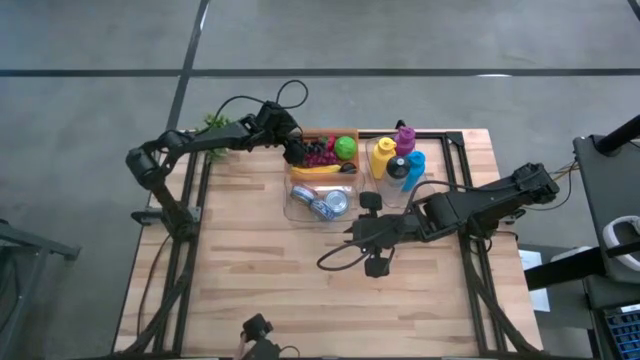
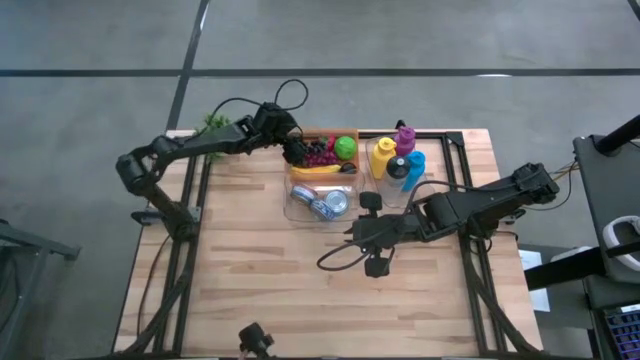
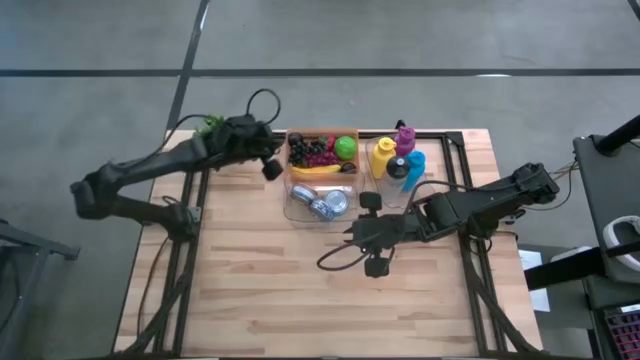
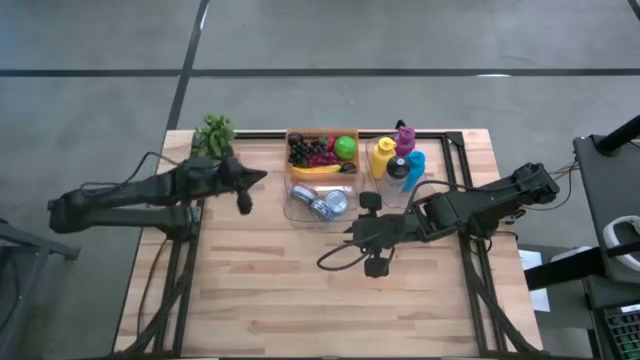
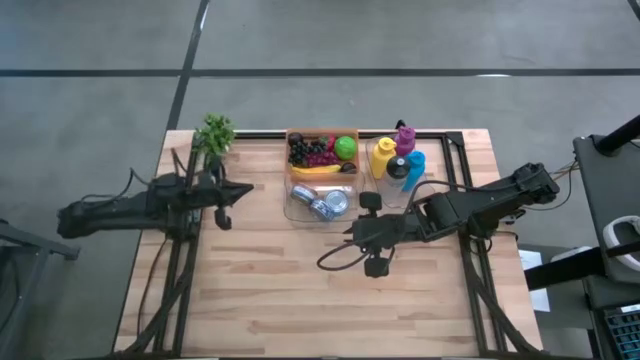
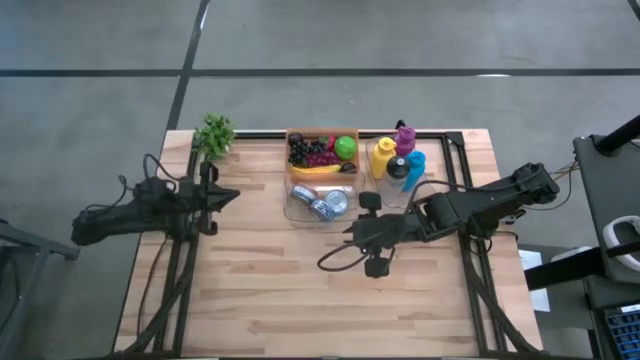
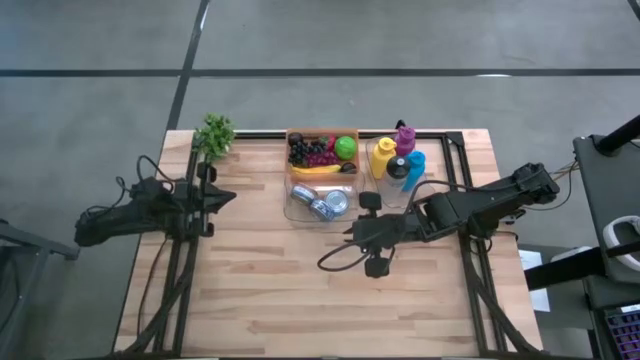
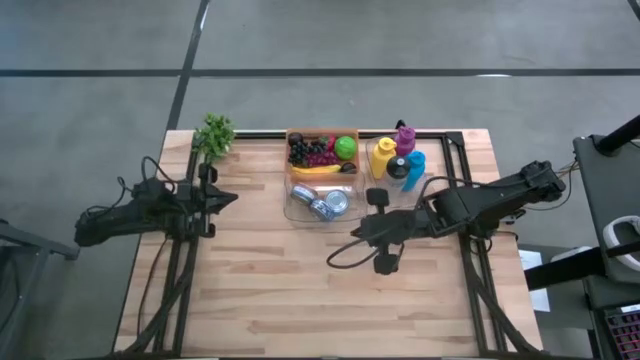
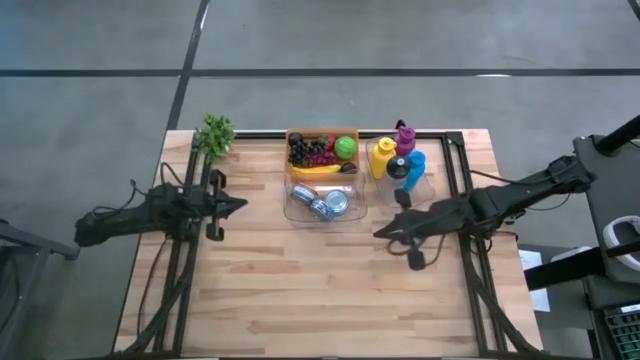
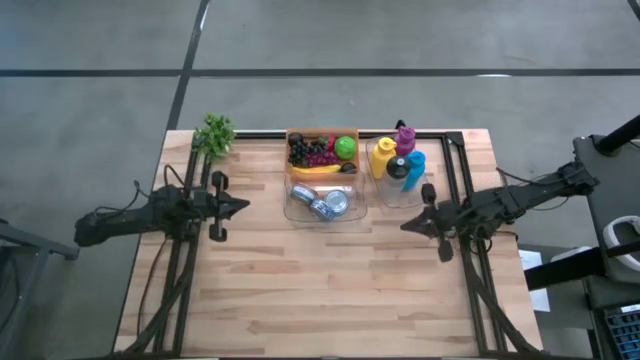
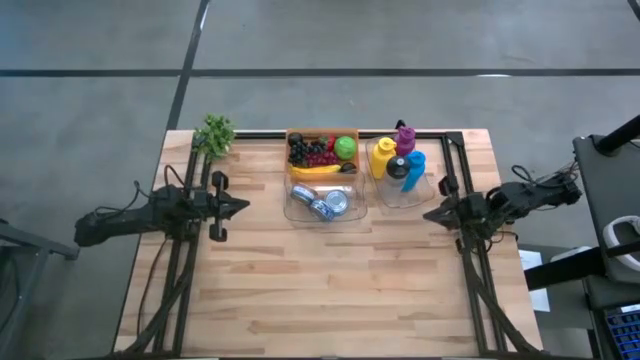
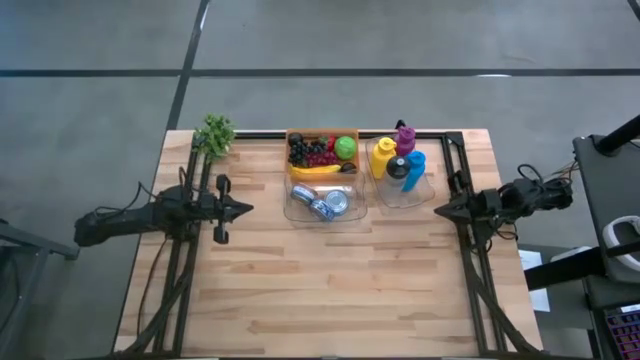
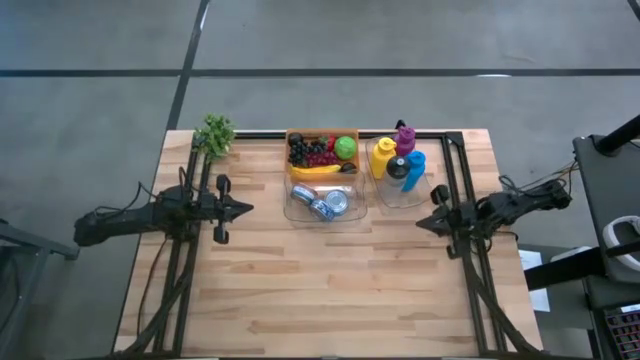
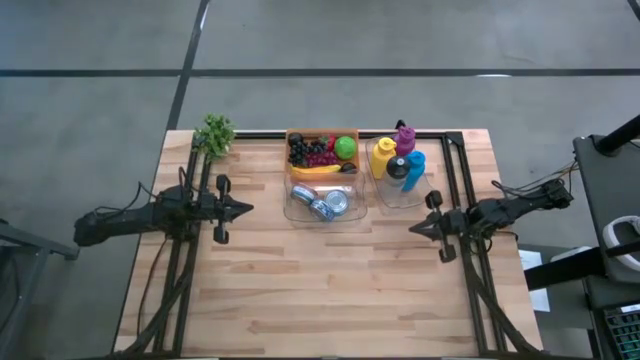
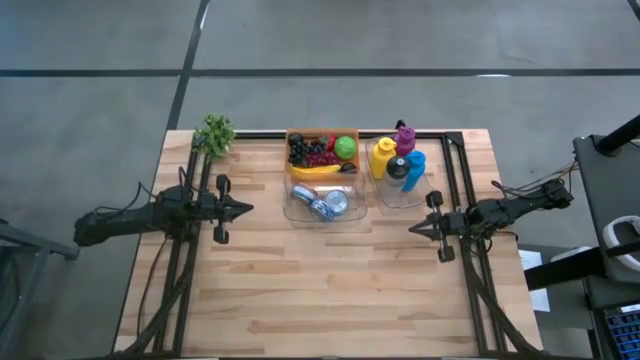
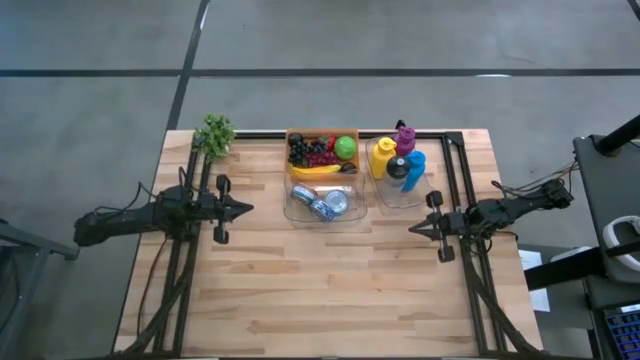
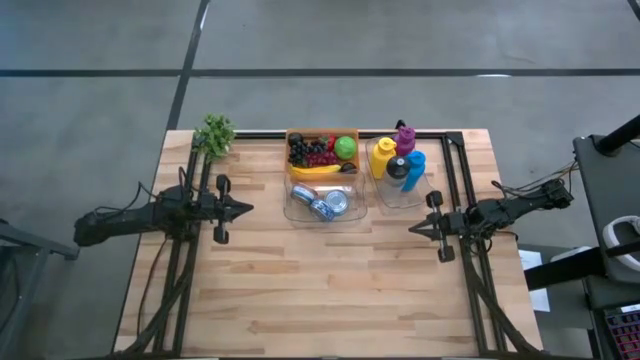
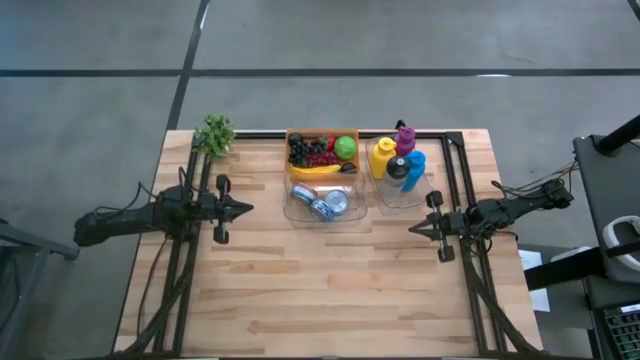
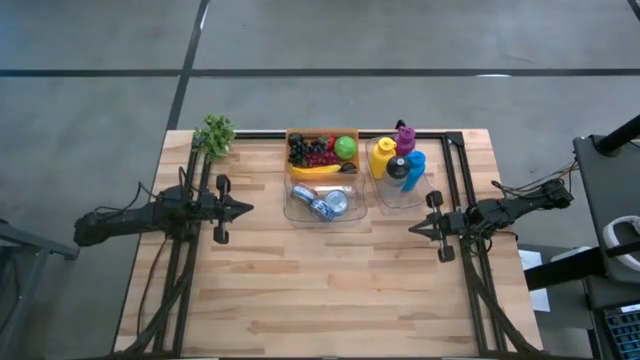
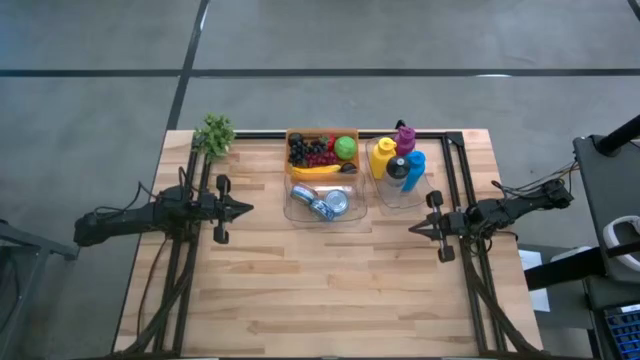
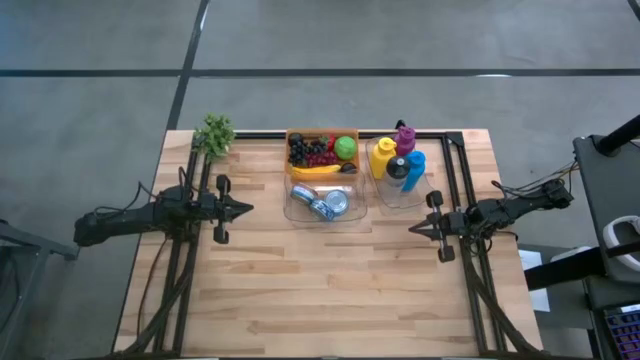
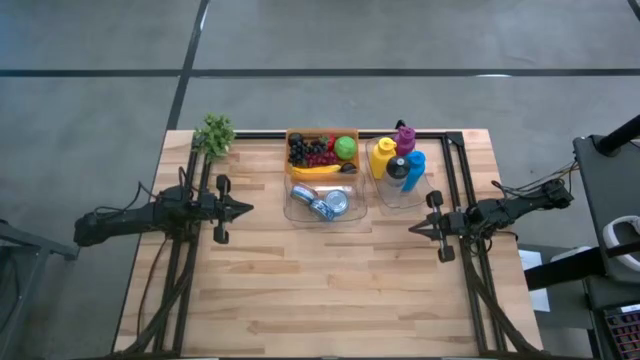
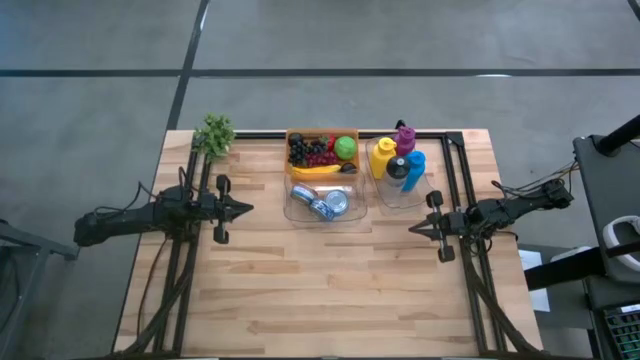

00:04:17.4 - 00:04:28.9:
Task: Pick & Place Food Item
Return to Home Position

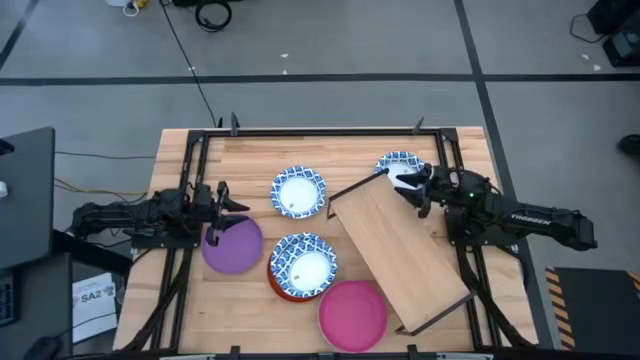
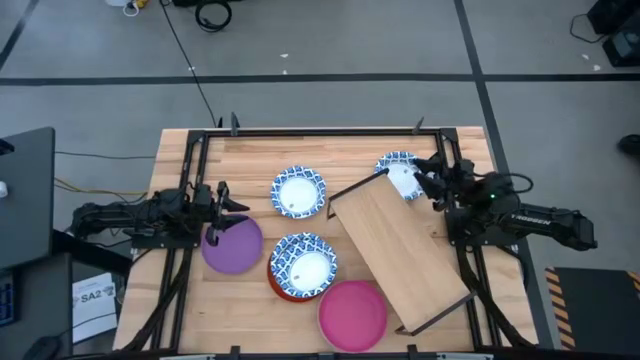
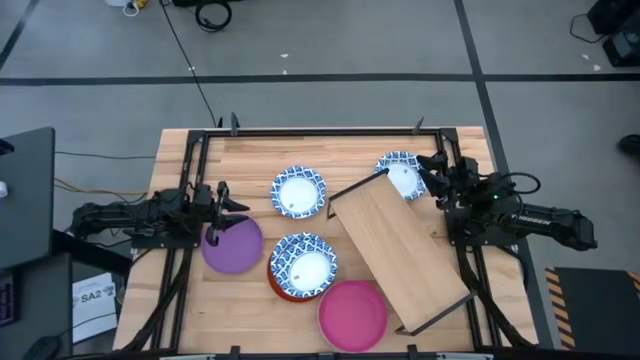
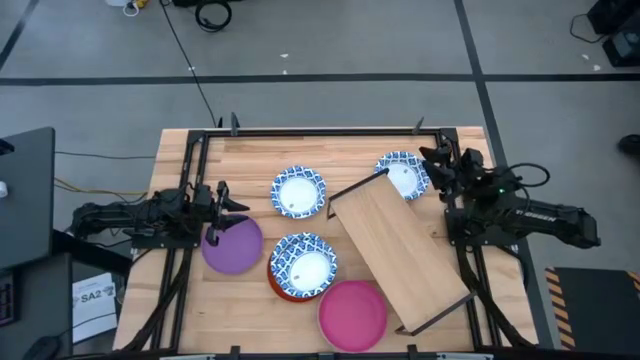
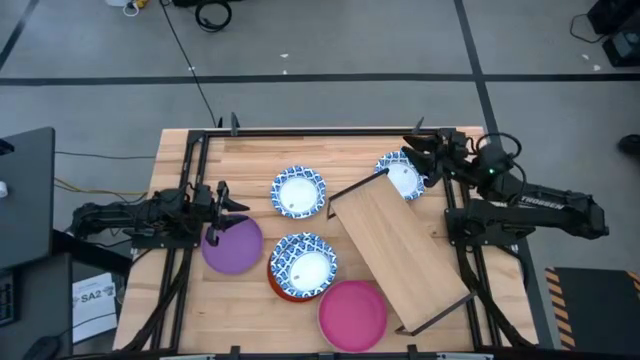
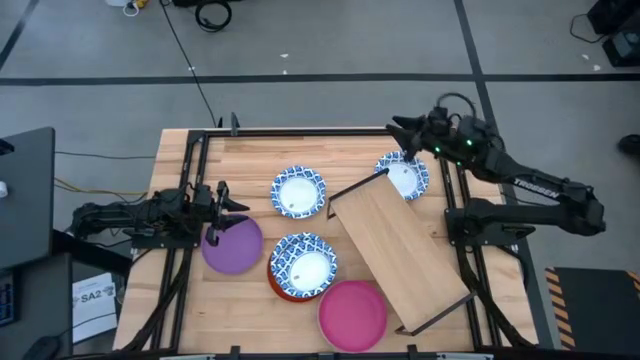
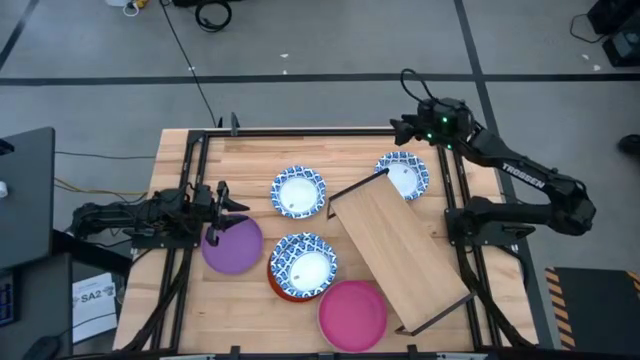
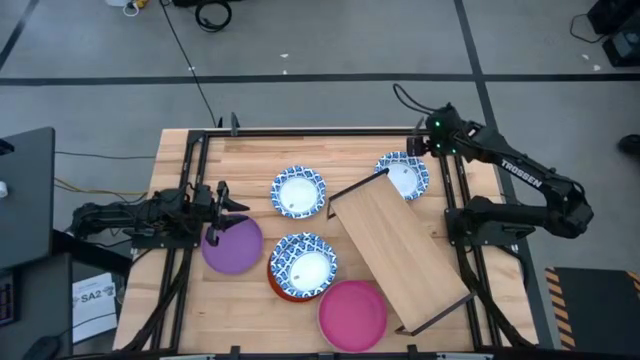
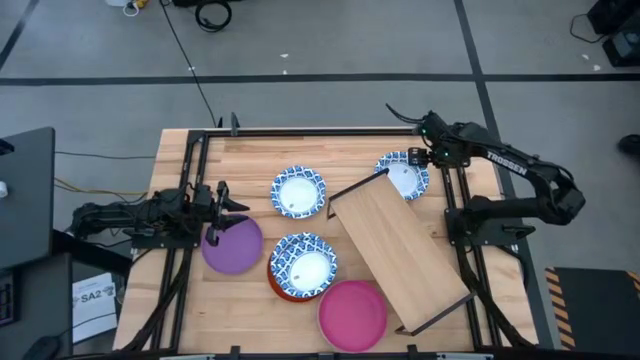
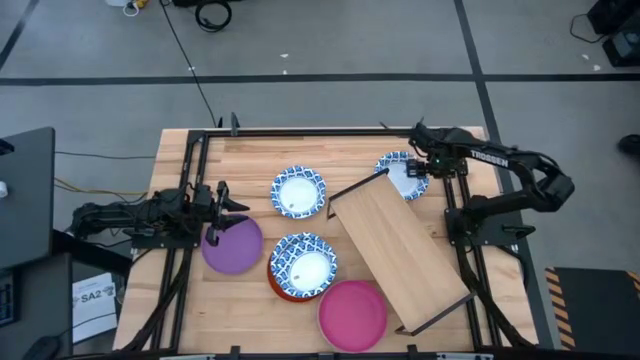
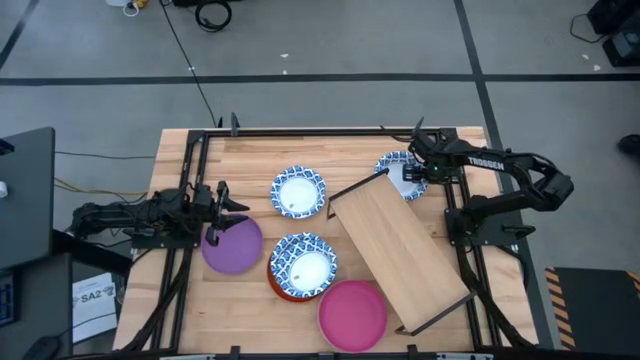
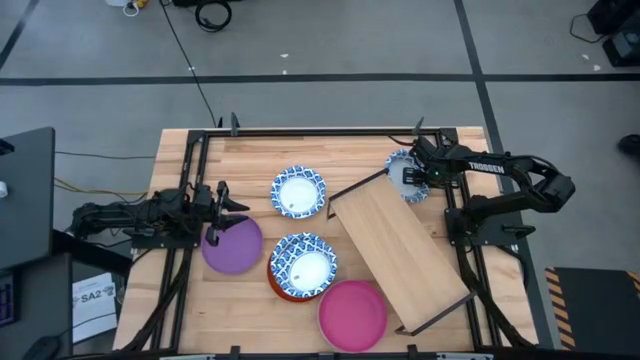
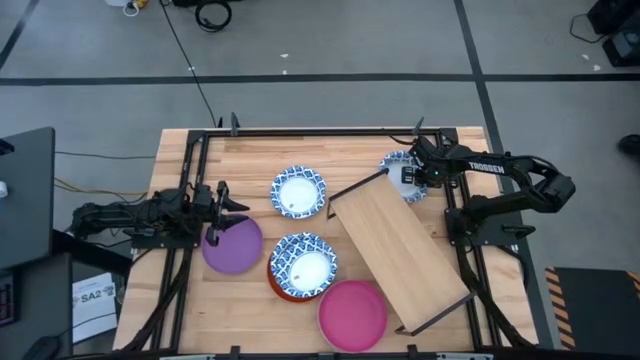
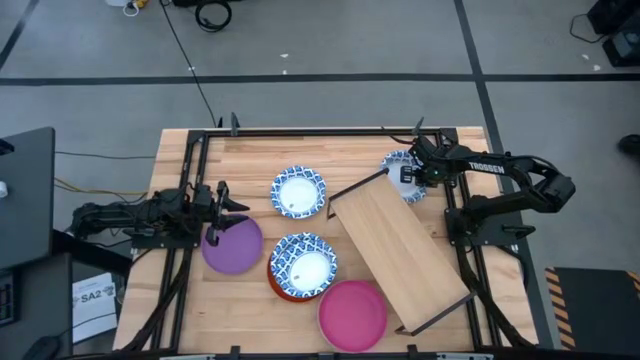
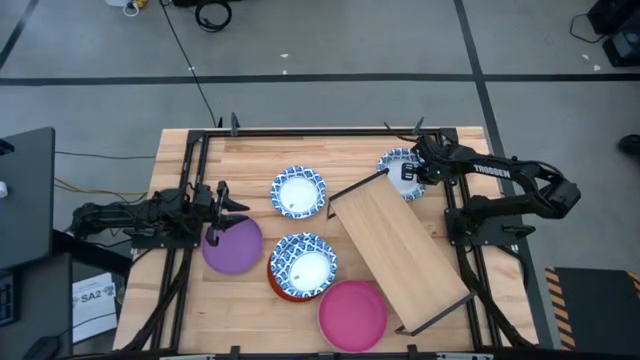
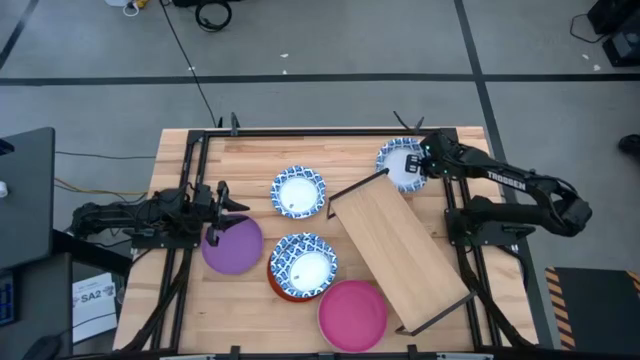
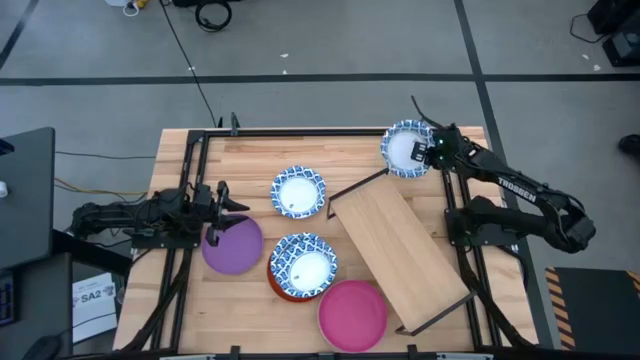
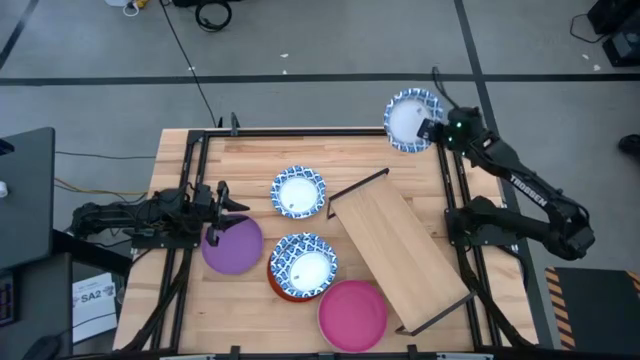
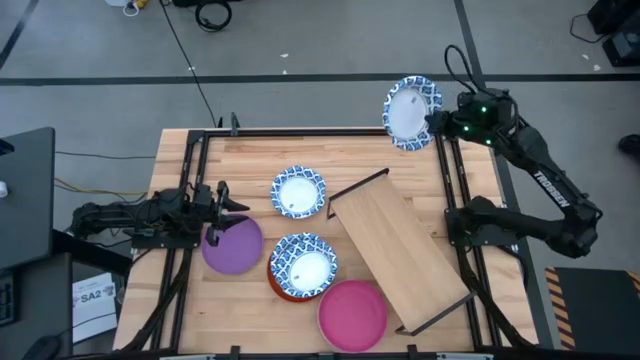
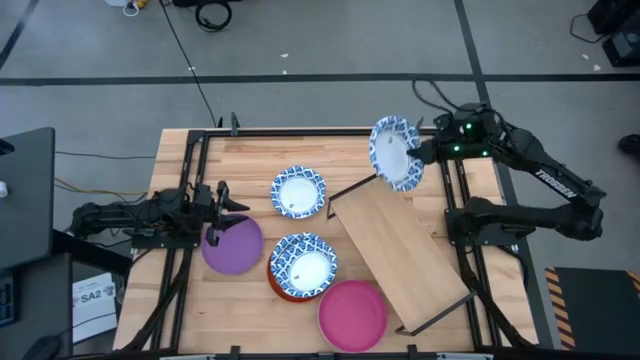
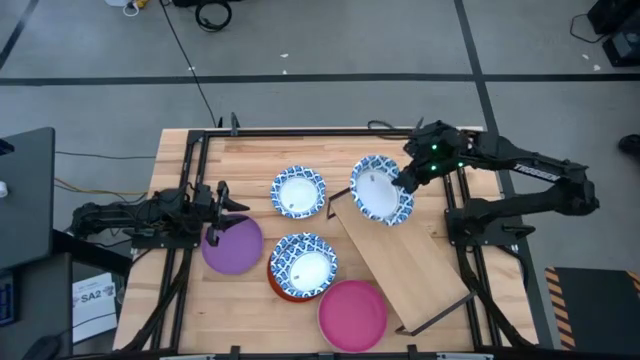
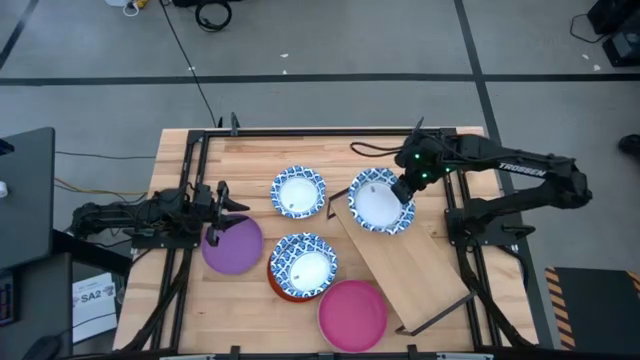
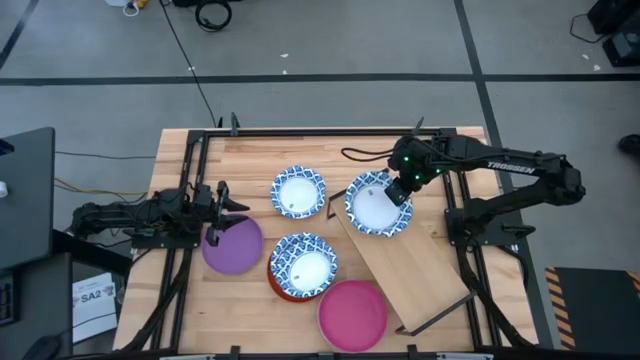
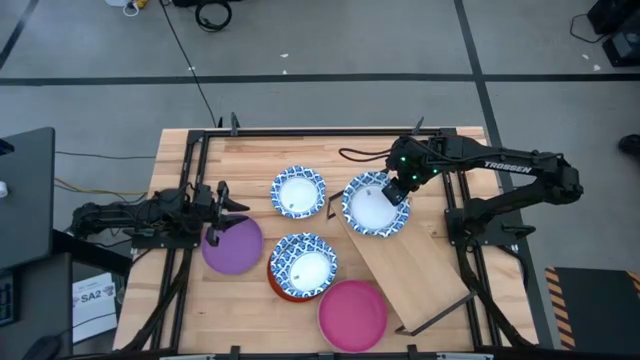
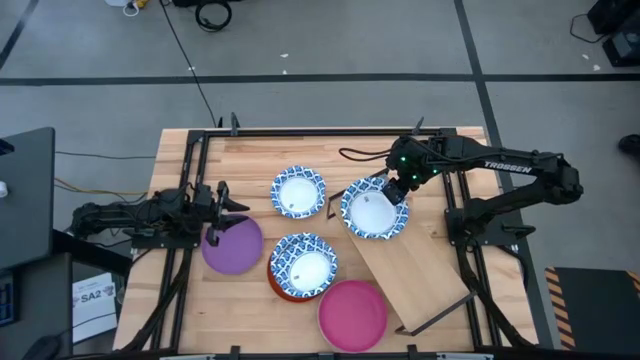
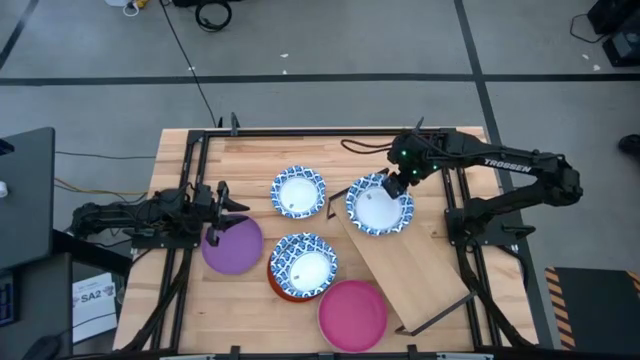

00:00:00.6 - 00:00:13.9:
Task: Place and stack plates onto a shelf
Put the white bowl onto the shelf
